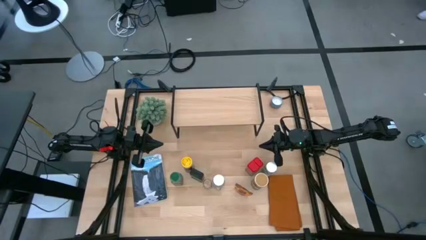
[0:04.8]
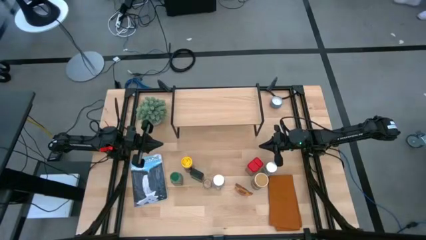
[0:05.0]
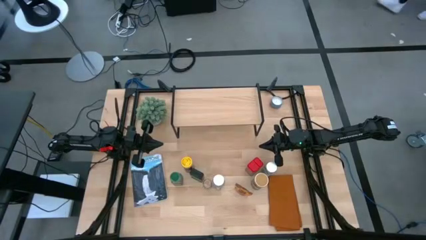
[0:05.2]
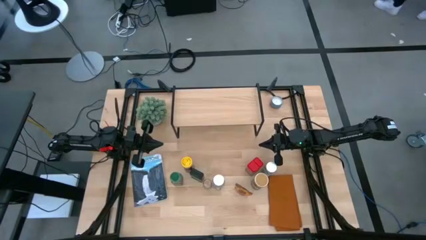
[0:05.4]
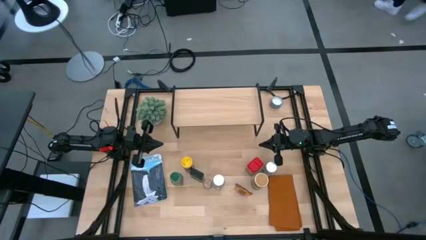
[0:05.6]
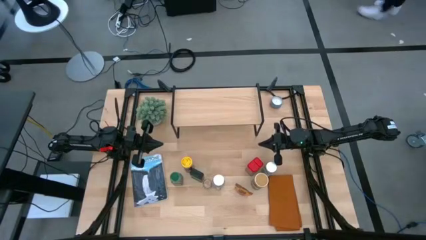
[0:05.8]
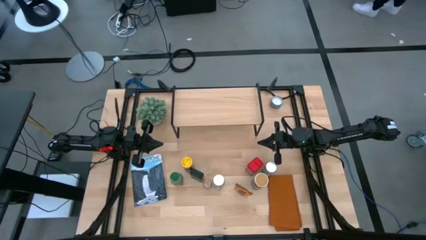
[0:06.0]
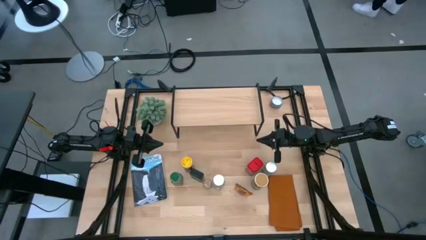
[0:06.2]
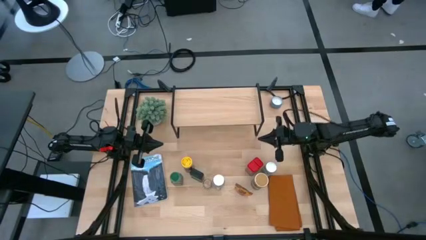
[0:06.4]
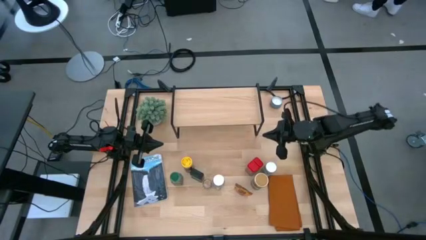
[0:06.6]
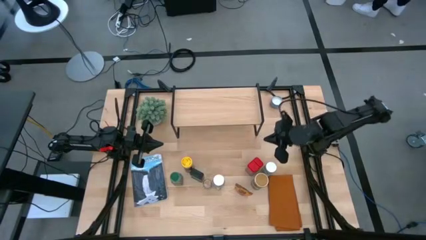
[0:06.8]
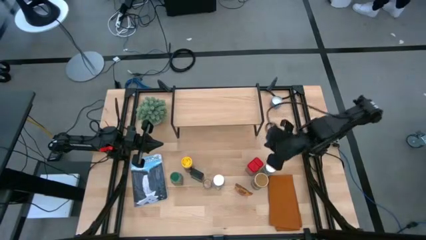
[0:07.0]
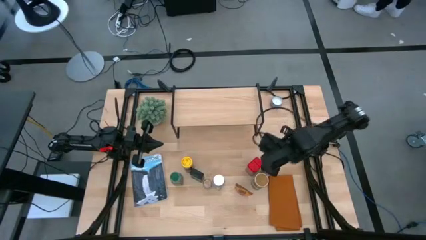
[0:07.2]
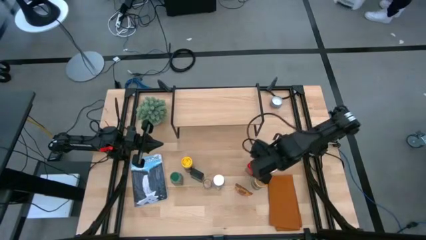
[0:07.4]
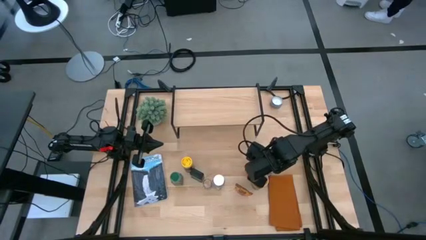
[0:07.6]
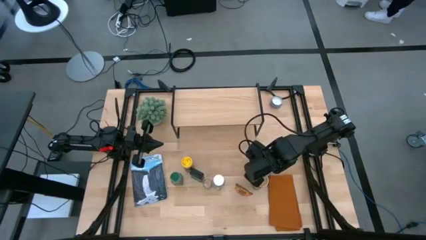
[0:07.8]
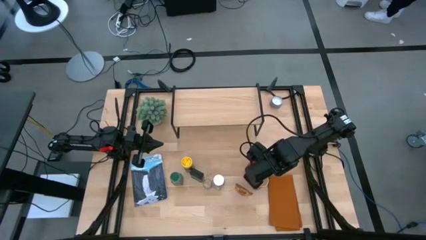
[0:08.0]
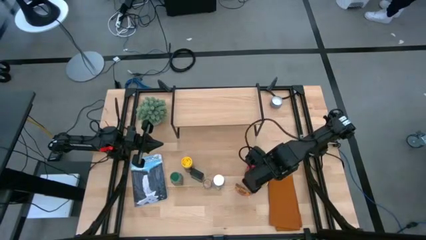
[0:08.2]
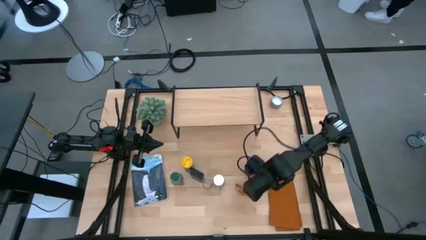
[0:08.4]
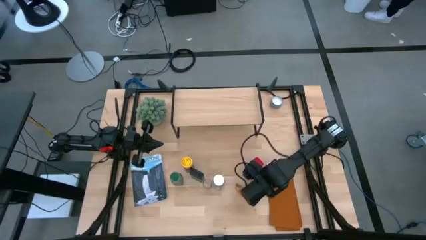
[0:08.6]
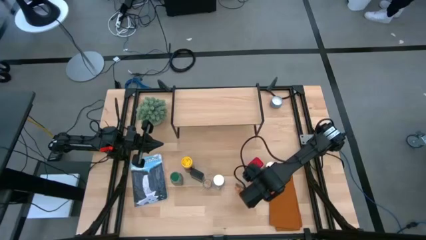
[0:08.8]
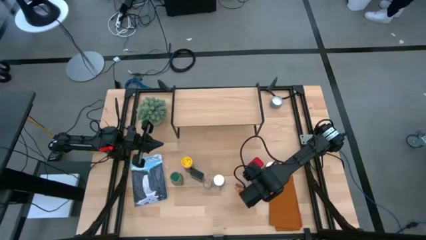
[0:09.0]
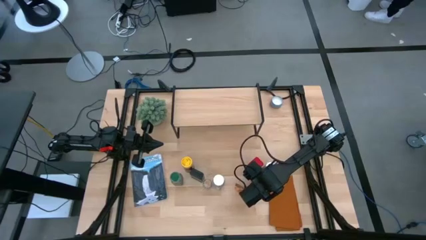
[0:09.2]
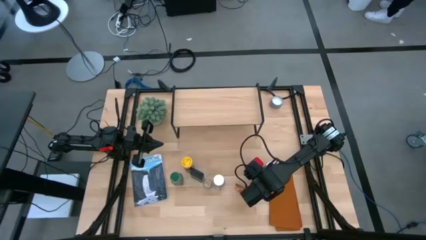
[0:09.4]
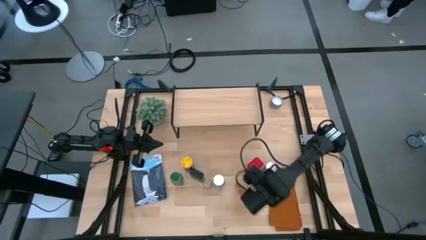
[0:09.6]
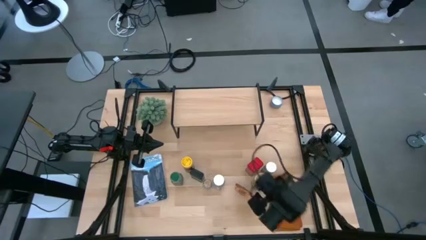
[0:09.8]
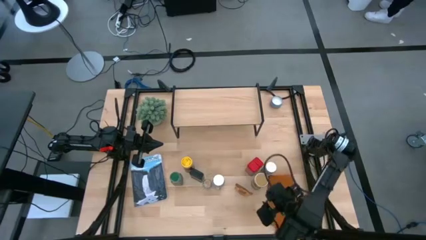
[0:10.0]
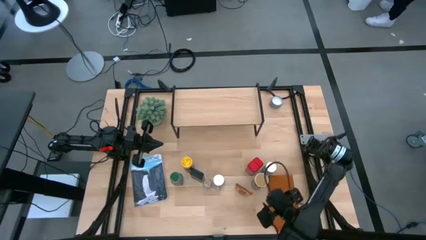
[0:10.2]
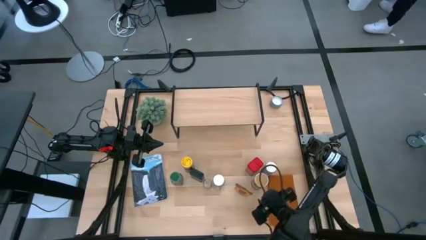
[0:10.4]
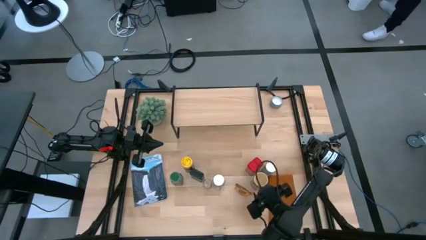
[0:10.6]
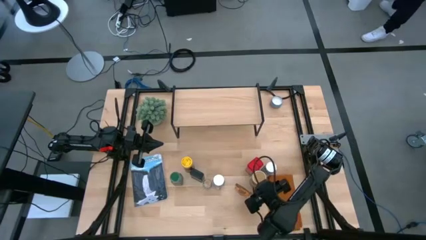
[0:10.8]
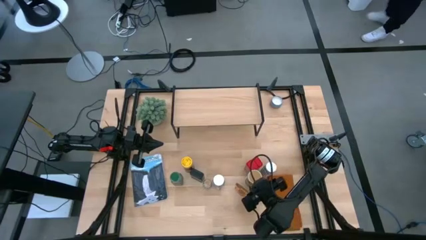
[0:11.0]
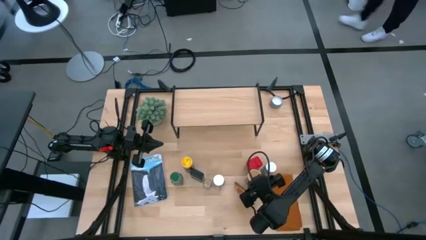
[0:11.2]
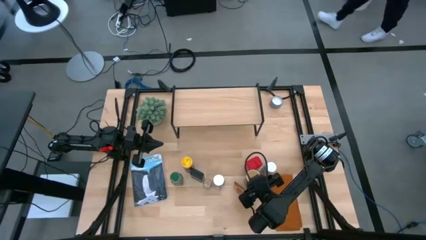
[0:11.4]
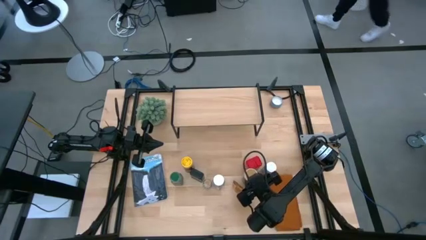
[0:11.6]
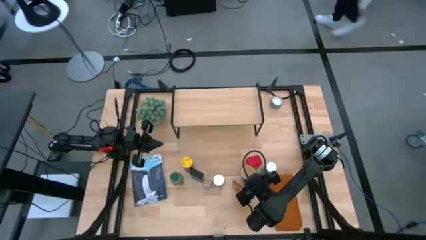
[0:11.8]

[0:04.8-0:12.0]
Task: Shelf spices
Put the golden seasoning bottle on the shelf

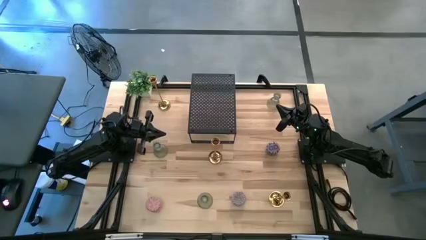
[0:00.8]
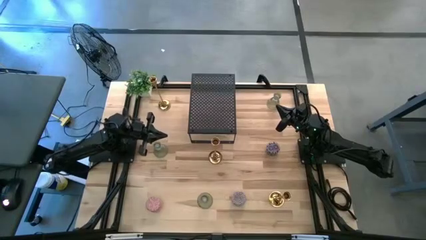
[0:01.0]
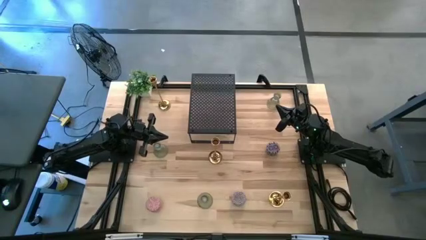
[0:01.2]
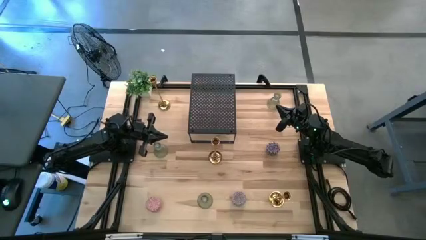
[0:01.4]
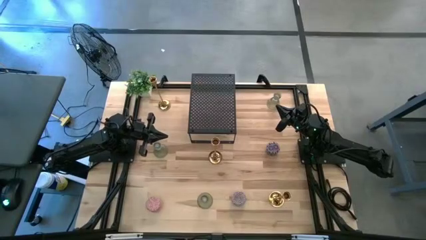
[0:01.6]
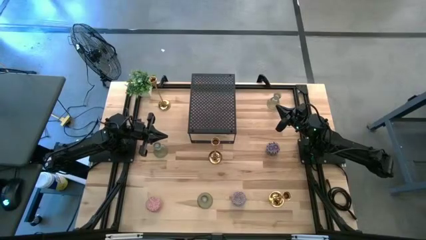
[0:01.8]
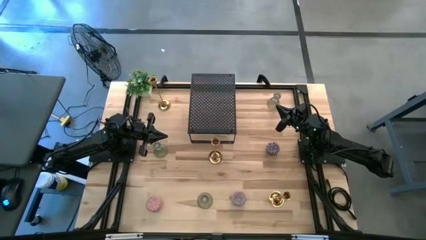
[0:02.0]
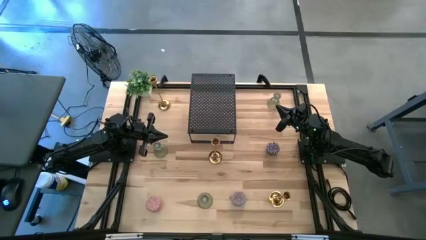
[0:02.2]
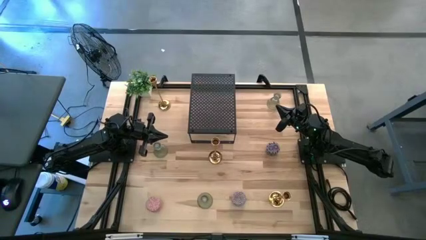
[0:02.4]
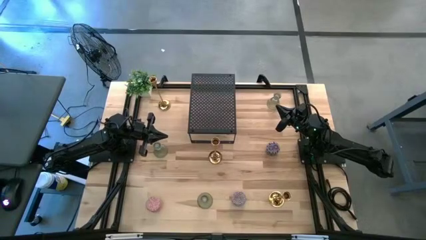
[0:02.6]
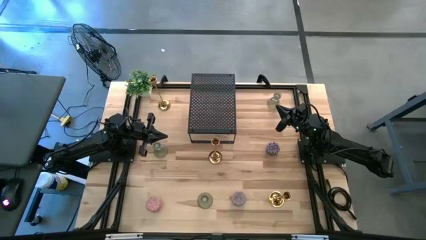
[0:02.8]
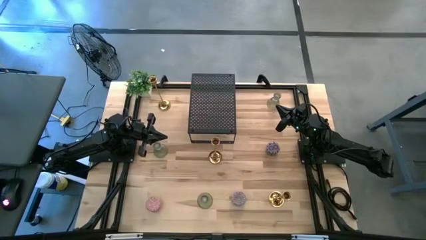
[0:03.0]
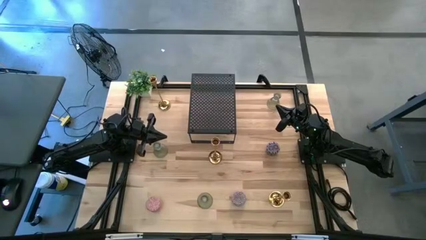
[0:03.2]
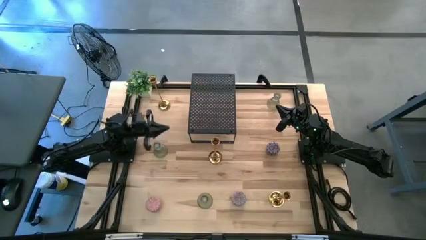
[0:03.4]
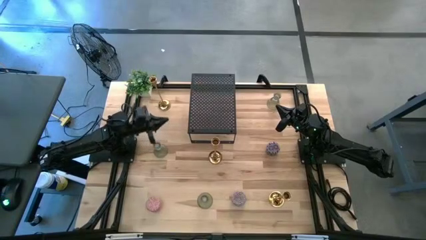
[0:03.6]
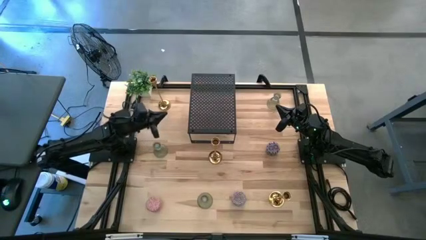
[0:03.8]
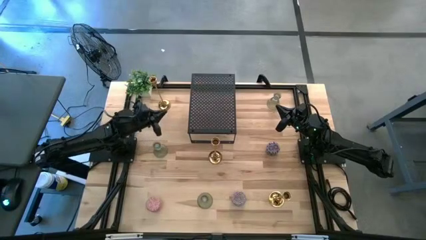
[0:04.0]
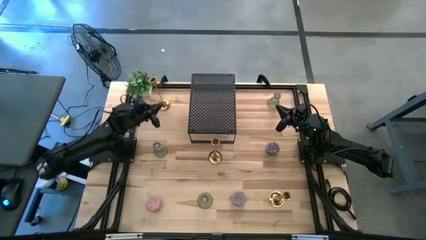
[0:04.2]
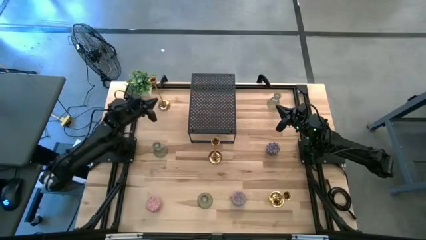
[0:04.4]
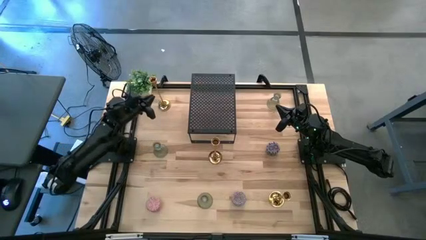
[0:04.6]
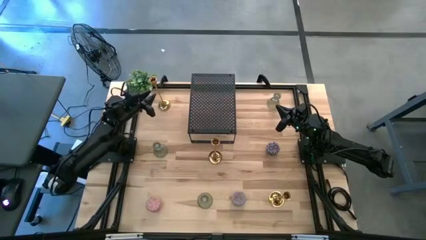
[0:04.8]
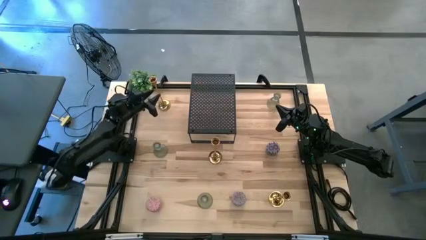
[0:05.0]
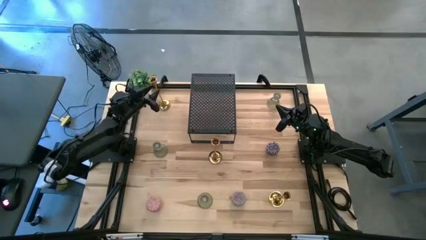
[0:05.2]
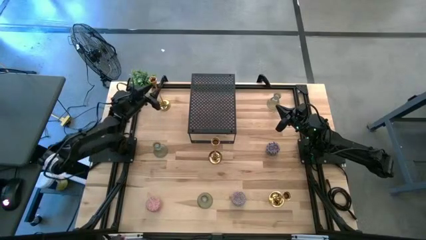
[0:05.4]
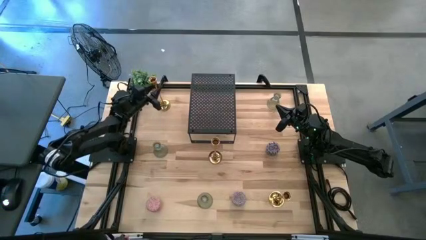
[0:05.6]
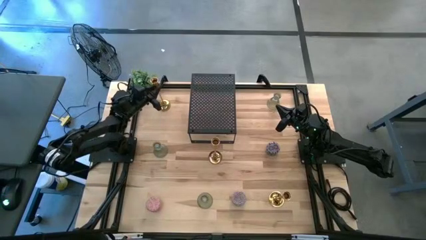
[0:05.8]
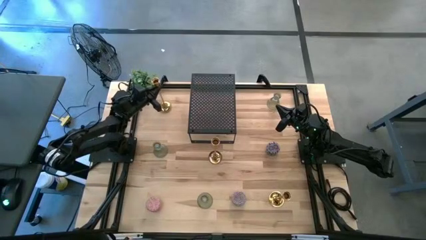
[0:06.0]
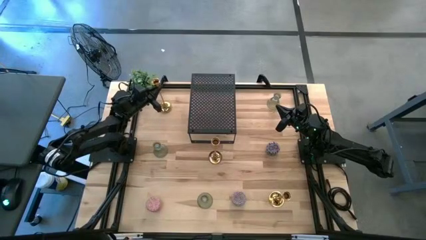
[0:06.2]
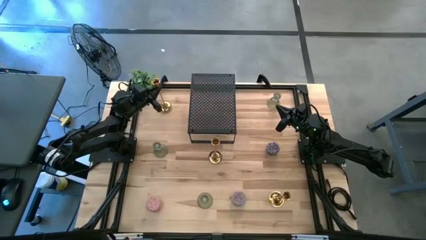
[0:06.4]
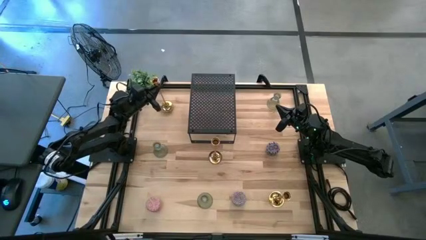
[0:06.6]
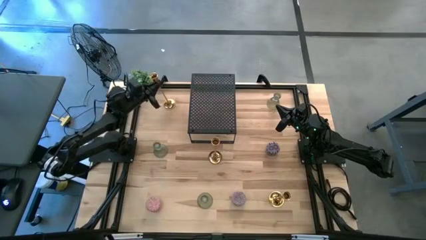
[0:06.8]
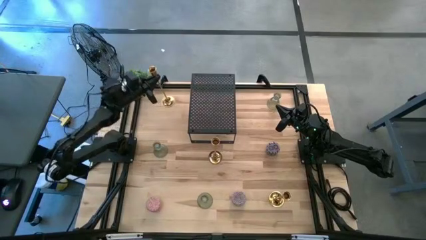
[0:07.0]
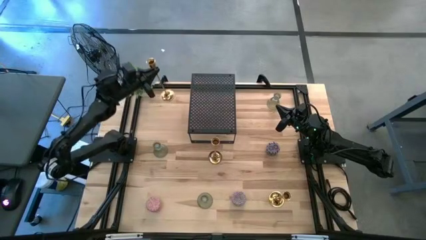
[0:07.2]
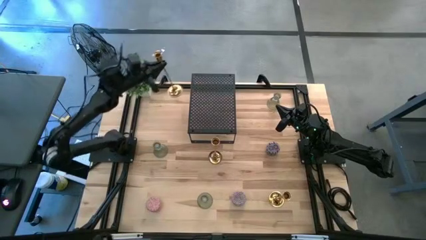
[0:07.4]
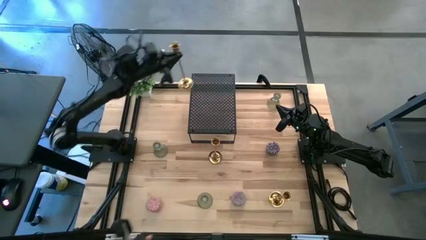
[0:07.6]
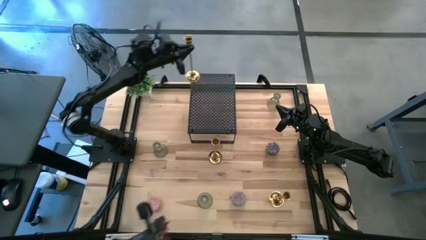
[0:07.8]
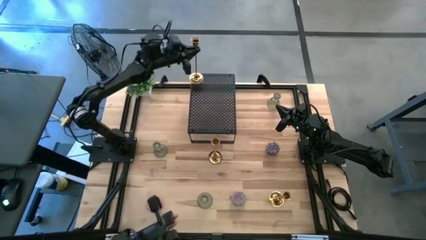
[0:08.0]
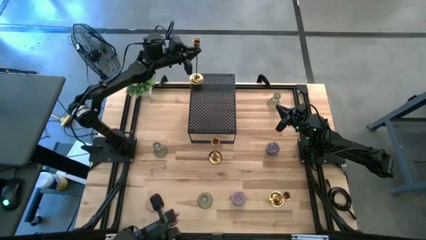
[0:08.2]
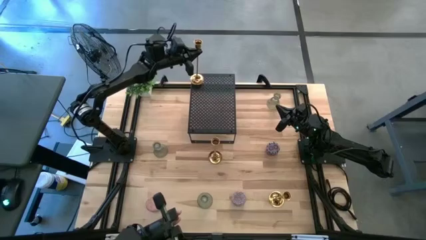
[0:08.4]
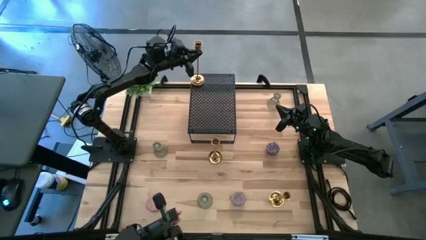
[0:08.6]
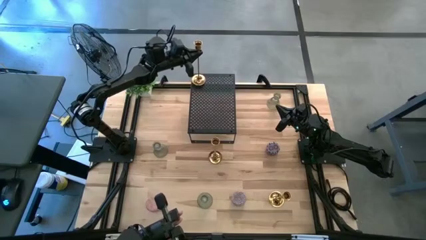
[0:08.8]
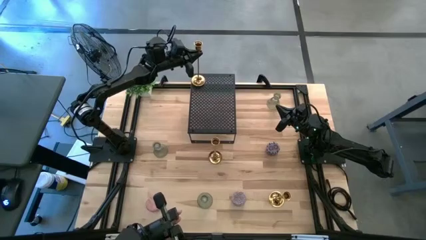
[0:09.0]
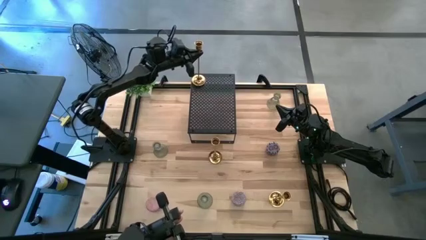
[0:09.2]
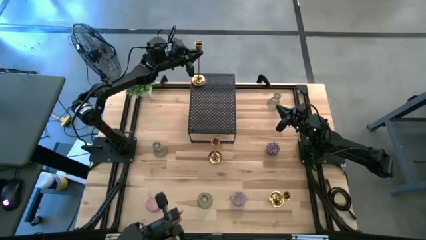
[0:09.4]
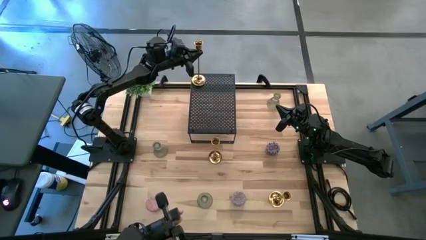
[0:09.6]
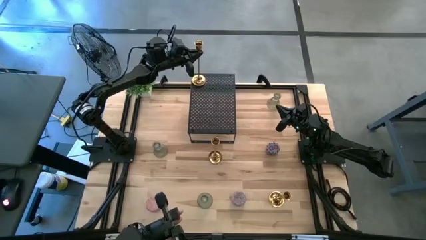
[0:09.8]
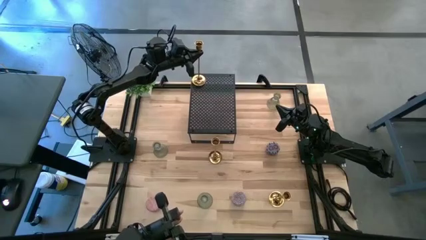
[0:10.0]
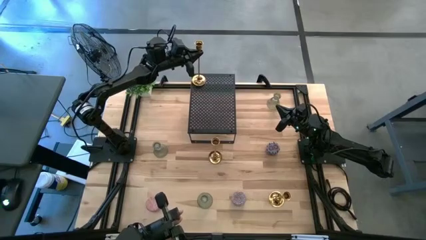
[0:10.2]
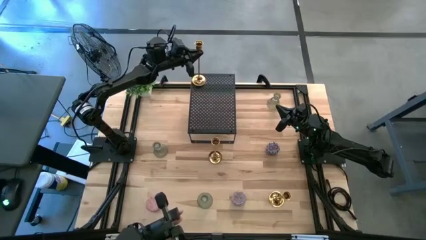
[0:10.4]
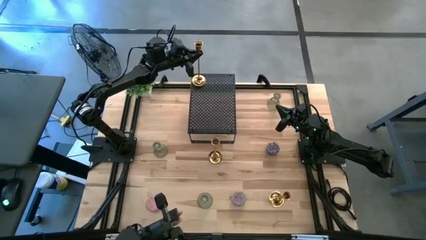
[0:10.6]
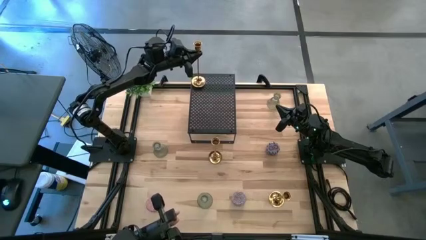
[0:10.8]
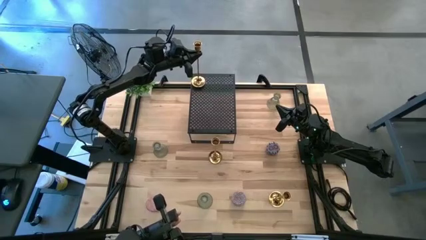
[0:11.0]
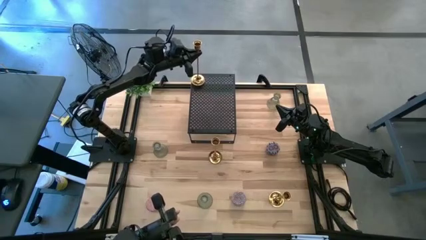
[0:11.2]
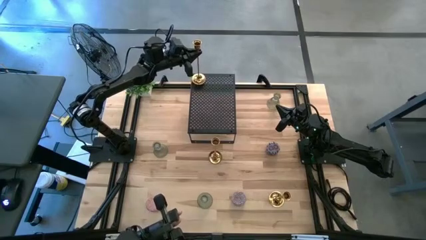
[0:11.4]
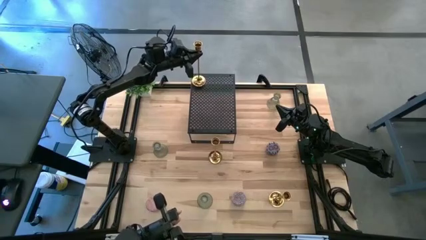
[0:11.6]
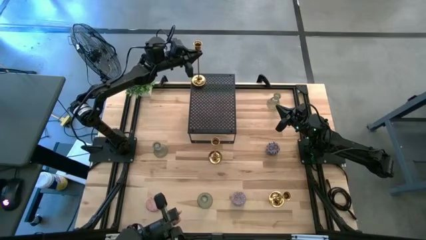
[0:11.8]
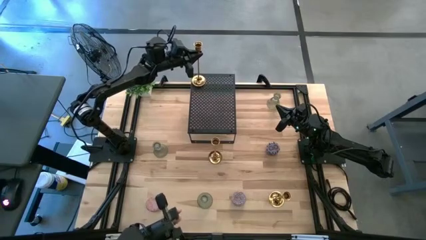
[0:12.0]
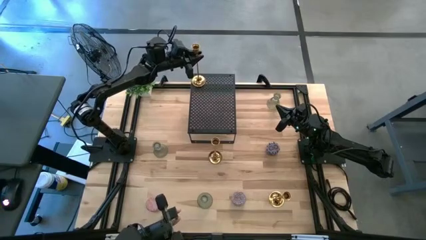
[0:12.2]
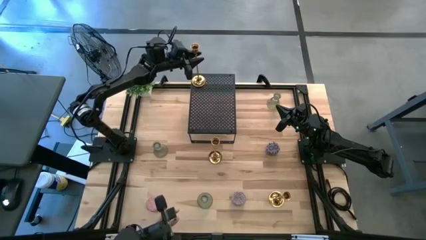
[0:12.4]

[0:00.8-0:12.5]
Task: Pick & Place candle stick holders
Put the top gold candle holder on the shelf
